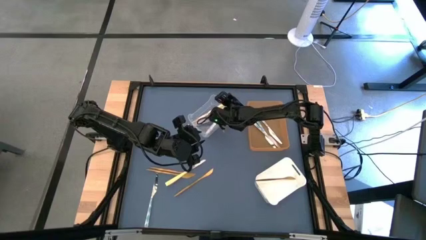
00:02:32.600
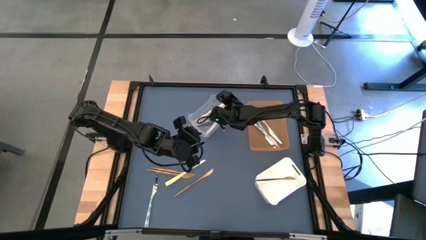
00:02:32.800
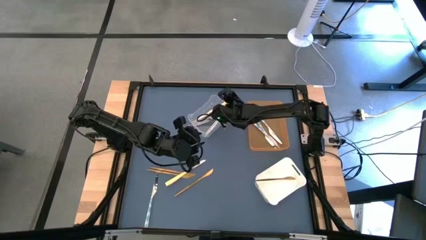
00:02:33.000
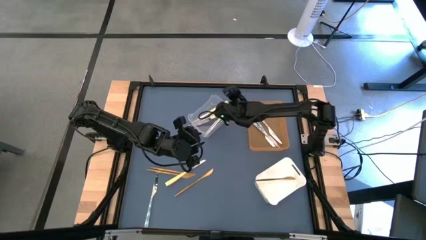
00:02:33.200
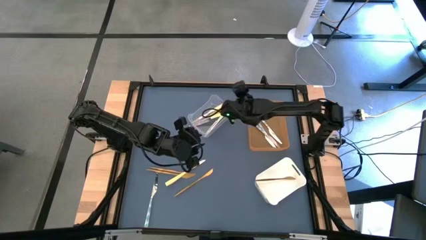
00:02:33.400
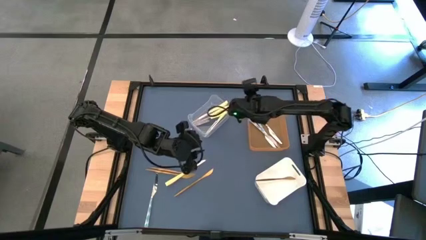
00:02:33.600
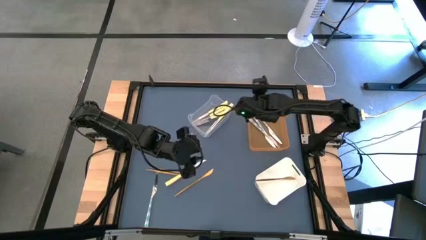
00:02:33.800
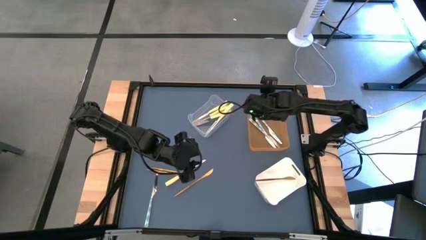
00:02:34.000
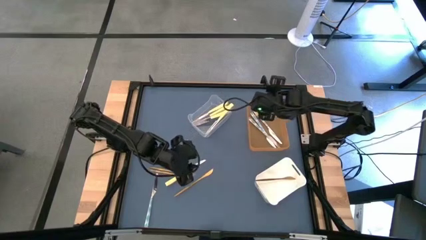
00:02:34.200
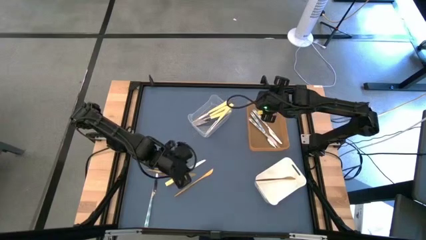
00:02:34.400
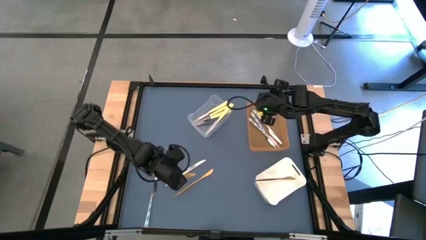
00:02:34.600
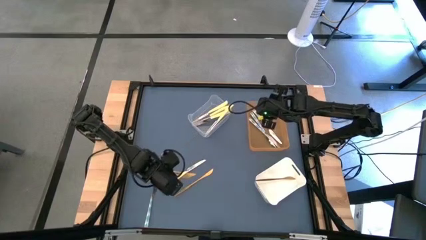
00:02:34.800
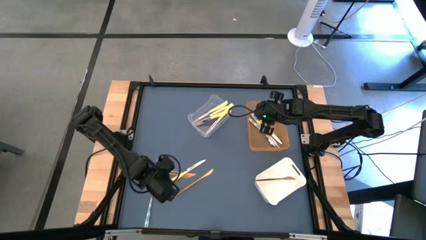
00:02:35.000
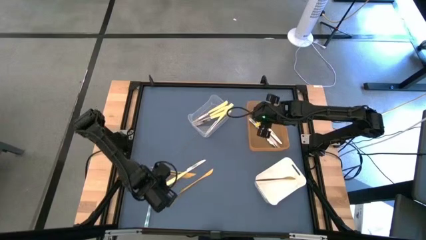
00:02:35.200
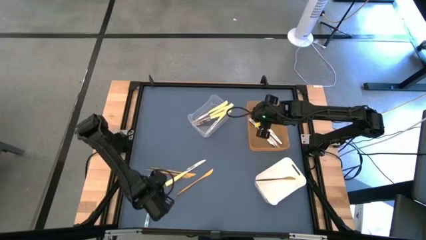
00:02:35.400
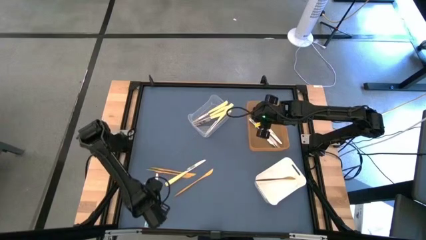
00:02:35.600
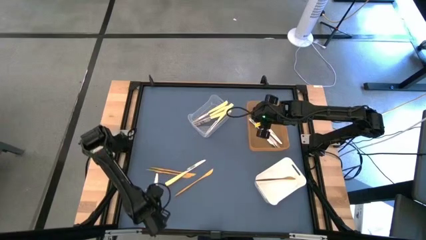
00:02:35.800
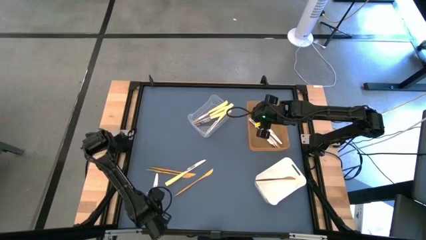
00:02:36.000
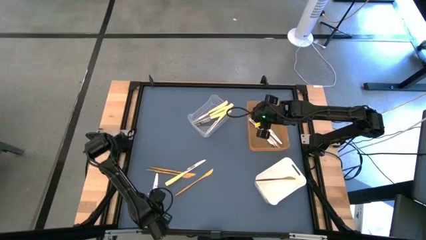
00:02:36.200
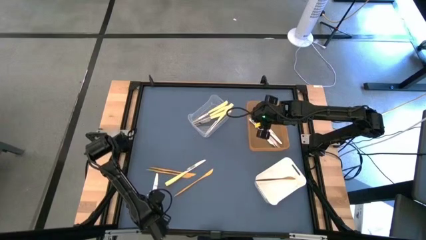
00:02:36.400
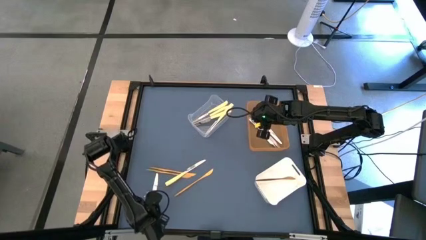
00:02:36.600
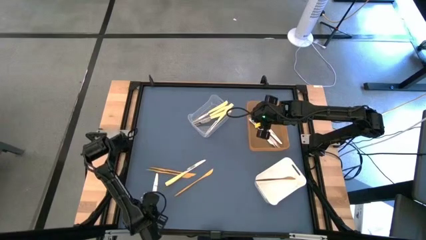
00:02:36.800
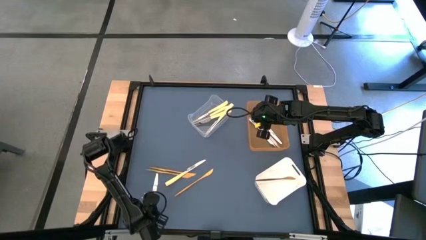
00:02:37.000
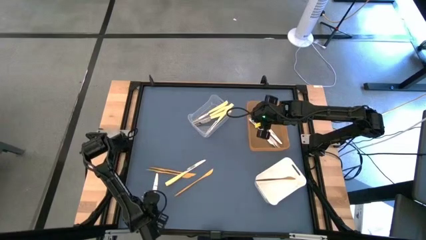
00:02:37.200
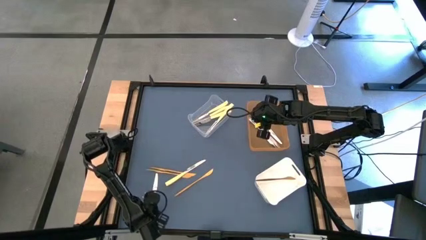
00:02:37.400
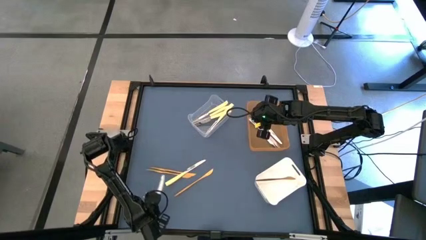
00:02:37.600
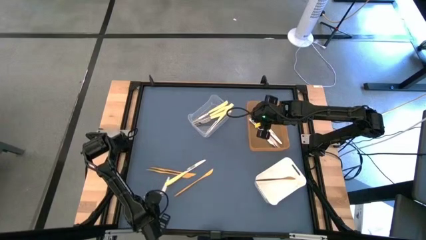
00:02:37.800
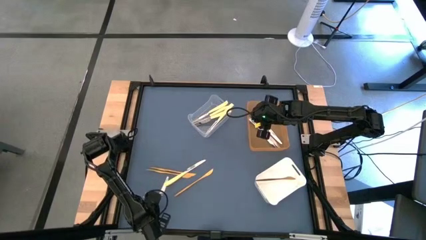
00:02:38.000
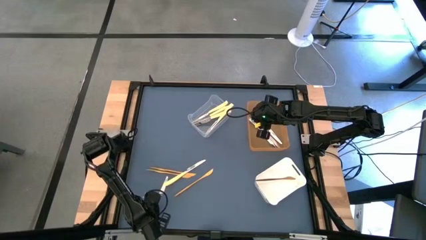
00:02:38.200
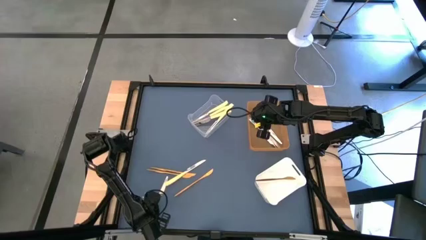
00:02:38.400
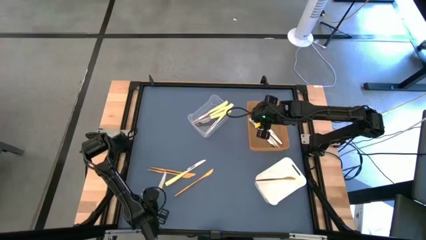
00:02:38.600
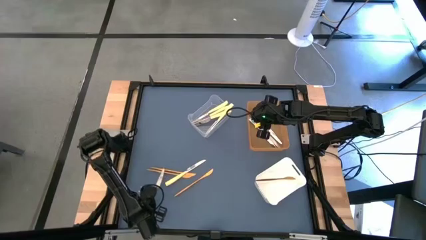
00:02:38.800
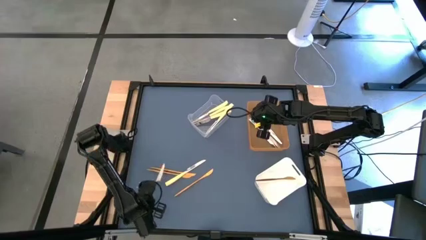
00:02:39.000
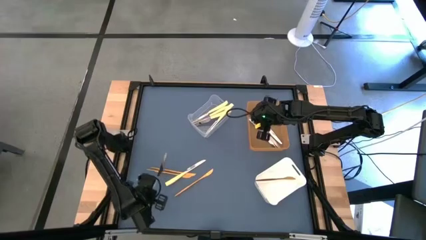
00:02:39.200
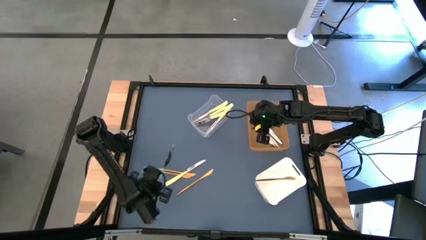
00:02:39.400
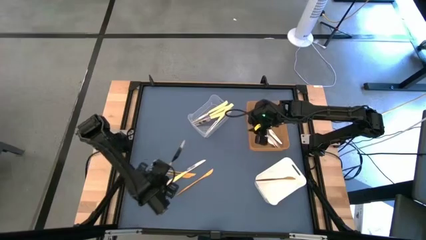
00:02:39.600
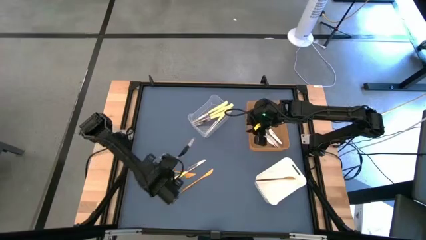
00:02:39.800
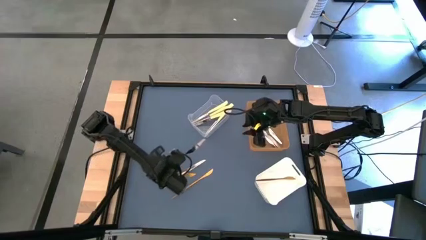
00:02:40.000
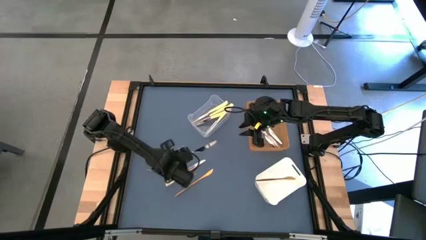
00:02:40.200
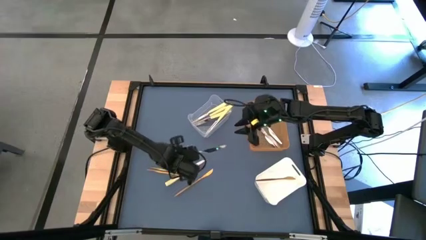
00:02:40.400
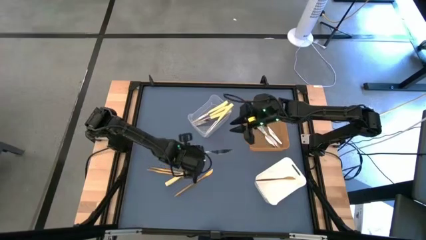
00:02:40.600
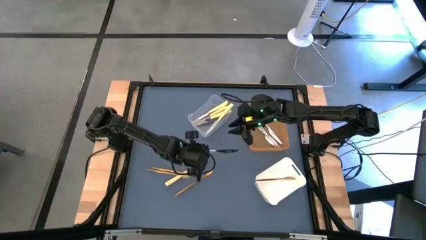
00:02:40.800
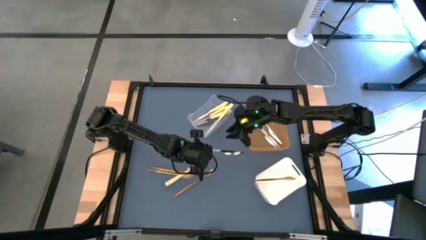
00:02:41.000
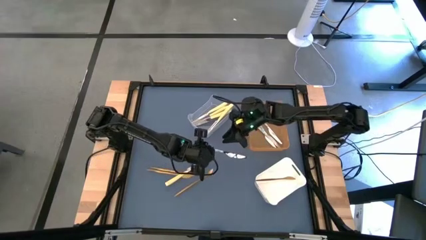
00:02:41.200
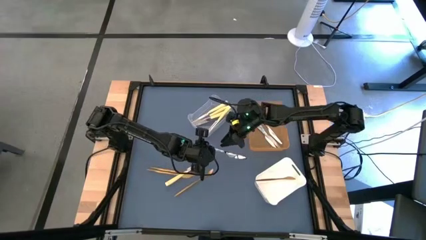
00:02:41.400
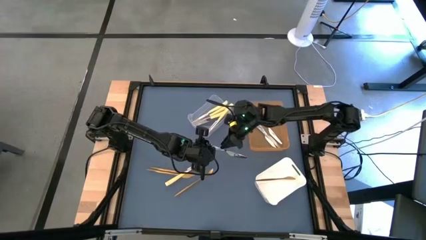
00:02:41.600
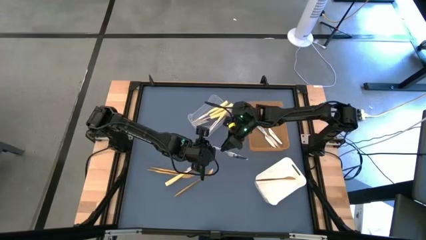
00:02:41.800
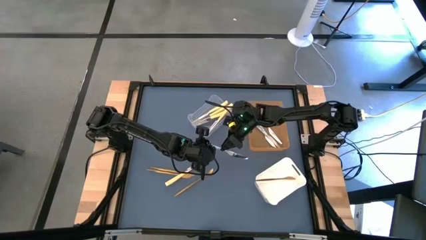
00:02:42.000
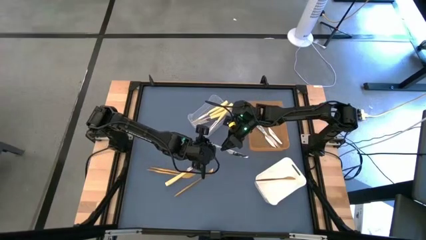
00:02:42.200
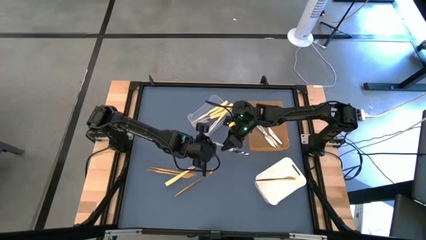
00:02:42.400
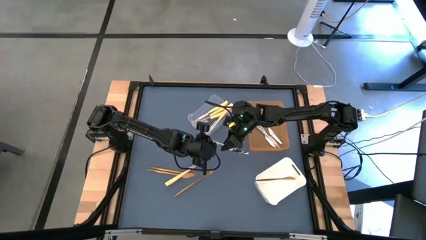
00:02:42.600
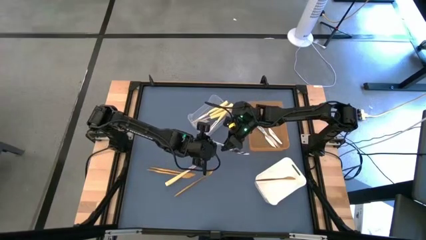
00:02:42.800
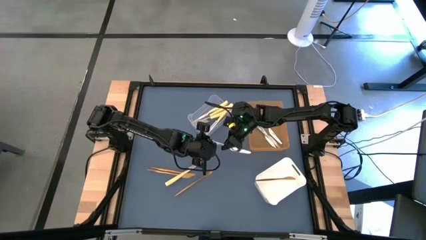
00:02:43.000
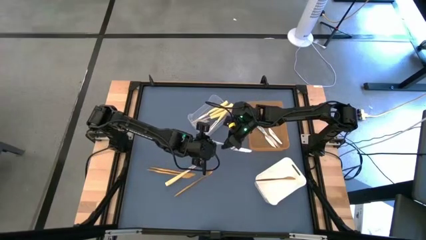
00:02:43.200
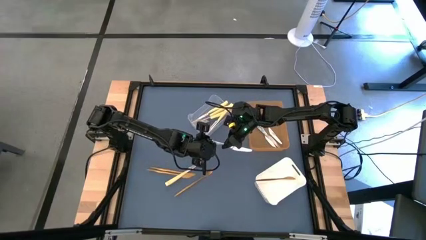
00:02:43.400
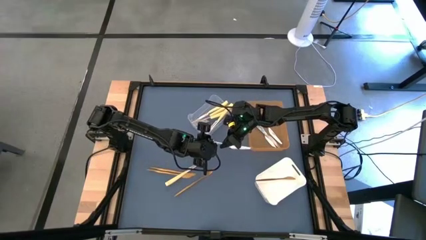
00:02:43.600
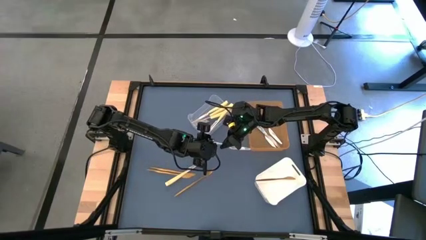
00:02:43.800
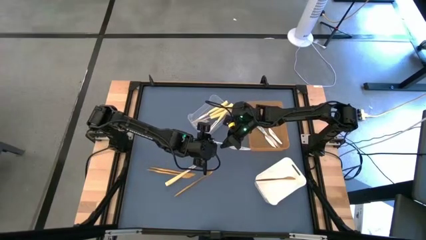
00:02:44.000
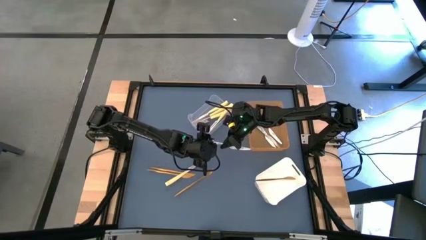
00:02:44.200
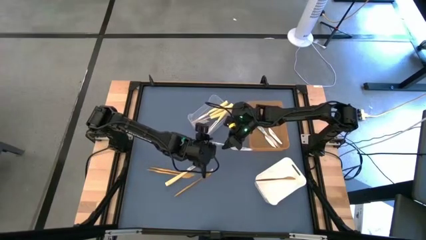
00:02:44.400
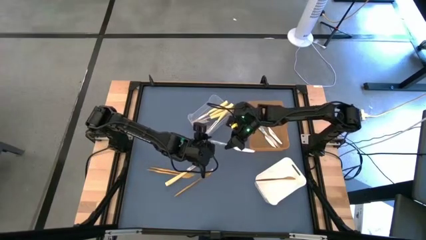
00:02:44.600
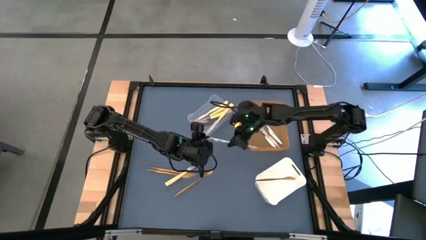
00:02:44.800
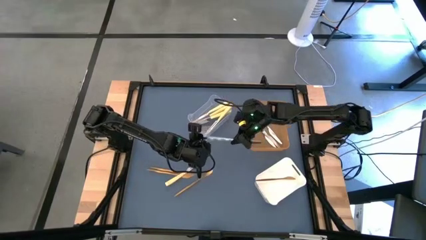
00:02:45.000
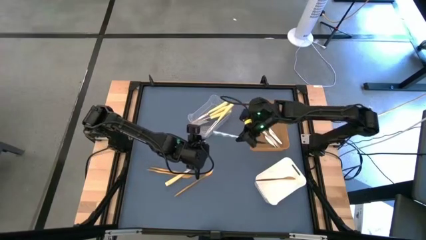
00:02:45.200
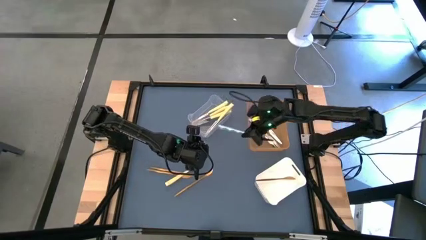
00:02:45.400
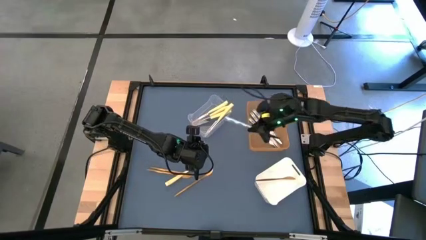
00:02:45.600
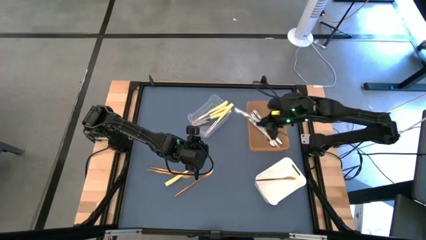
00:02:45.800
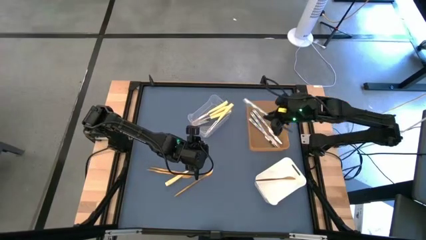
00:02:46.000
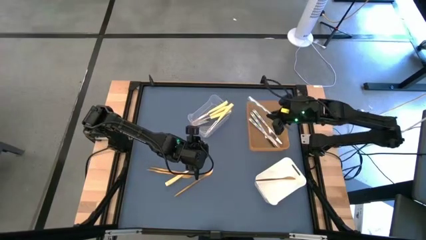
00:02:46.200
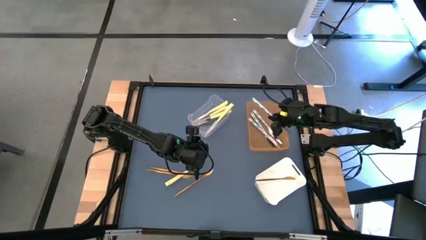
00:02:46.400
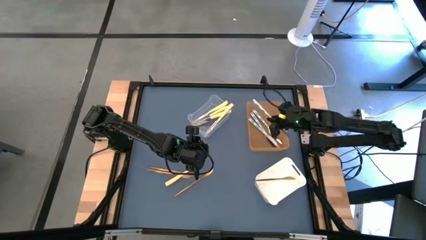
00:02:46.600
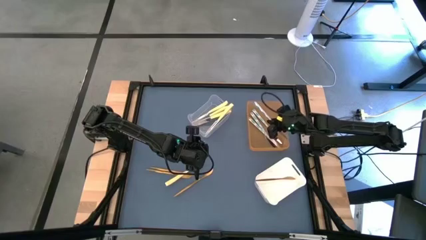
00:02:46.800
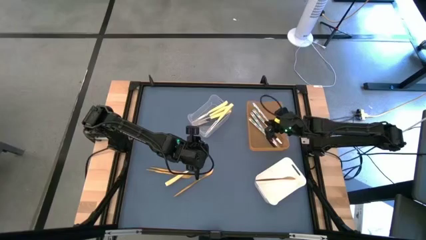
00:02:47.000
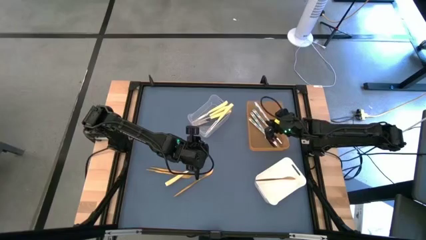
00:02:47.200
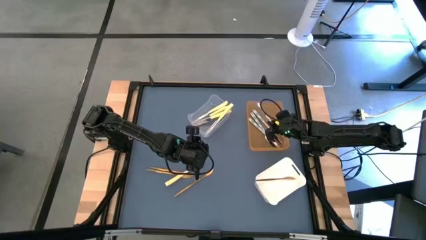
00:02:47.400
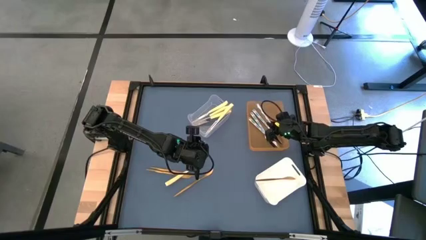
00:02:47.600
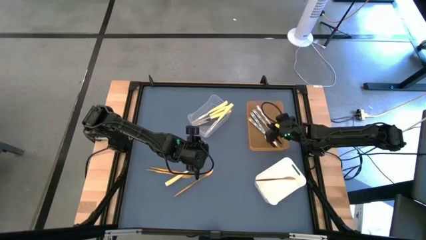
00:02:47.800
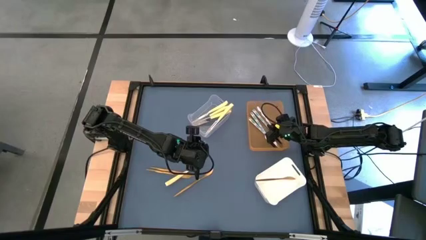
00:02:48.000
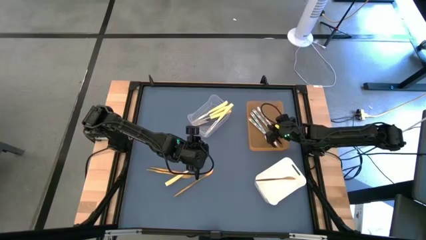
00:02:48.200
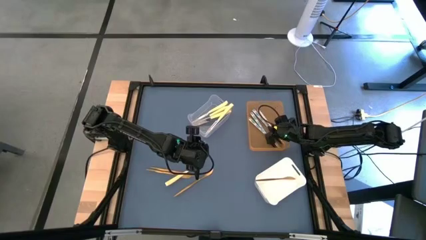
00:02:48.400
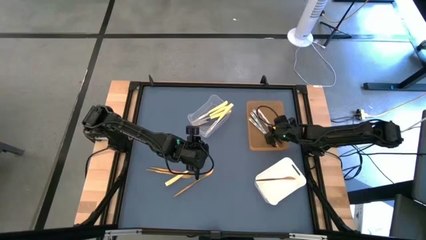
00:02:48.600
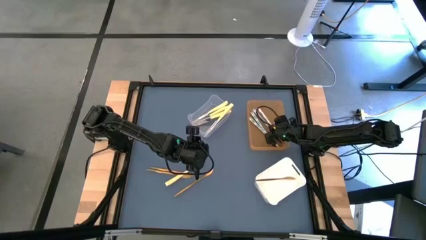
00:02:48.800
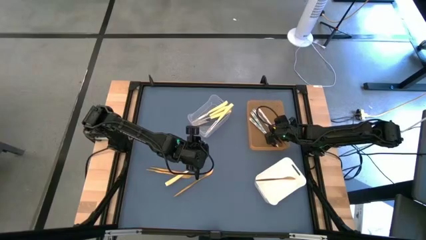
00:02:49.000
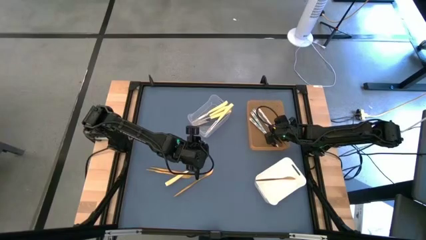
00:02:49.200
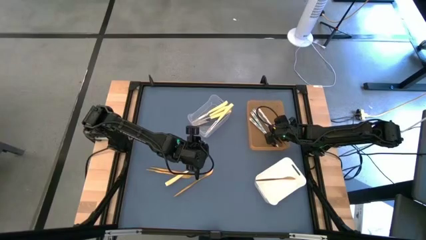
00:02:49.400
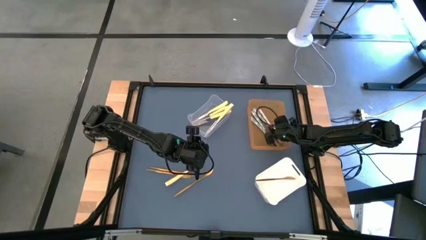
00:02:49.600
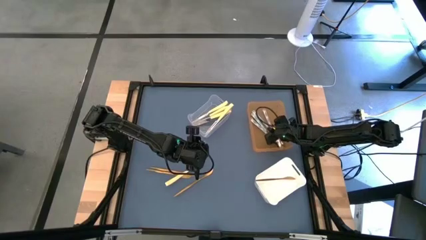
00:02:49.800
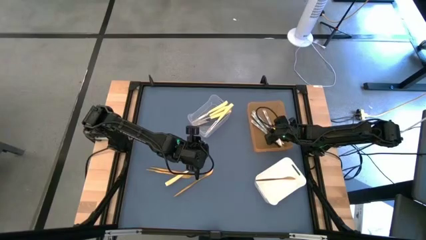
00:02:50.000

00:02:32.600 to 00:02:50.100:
Task: Sort silverware by color (type)
Put the white knife into the orange bin
